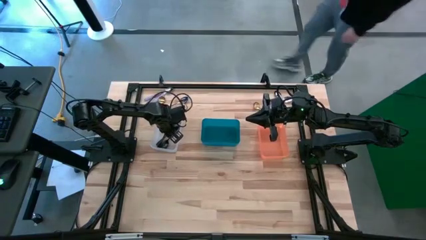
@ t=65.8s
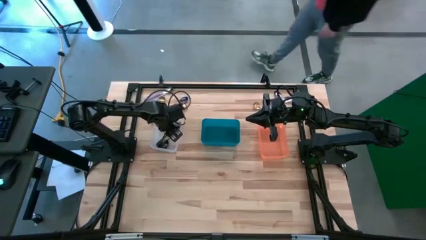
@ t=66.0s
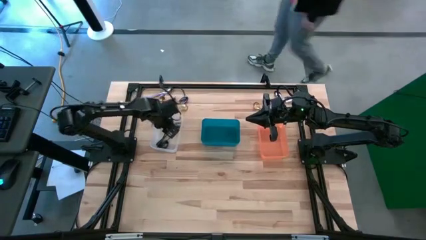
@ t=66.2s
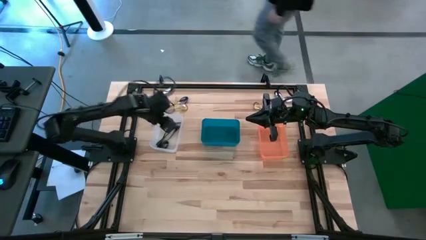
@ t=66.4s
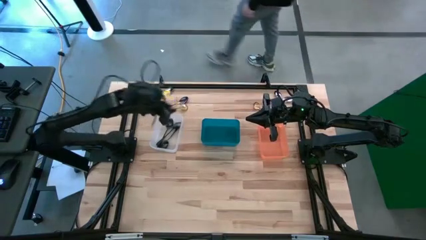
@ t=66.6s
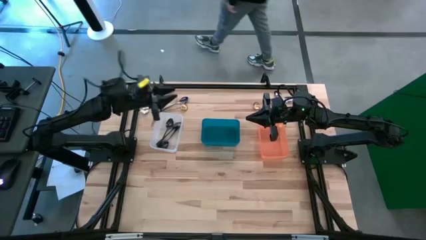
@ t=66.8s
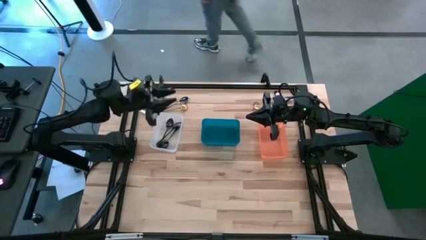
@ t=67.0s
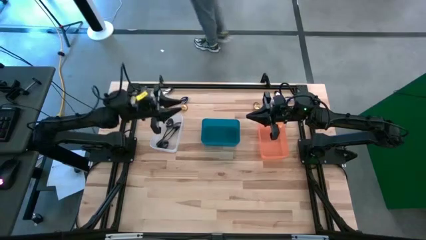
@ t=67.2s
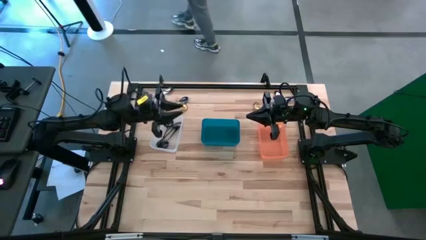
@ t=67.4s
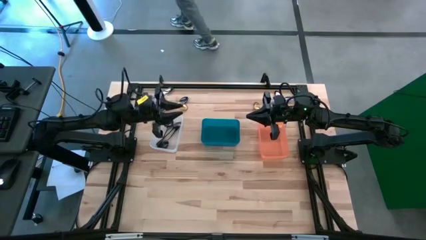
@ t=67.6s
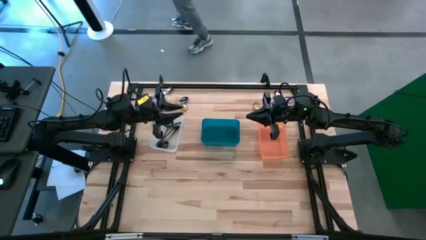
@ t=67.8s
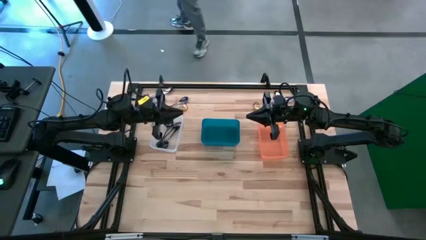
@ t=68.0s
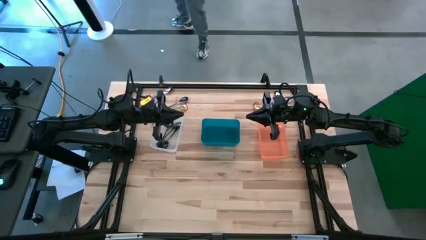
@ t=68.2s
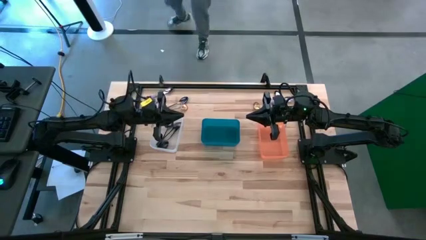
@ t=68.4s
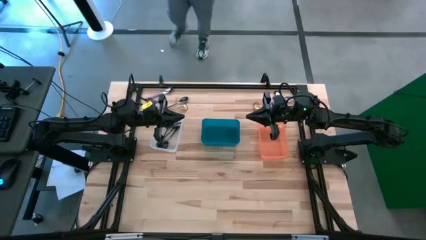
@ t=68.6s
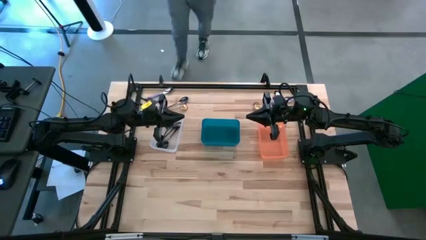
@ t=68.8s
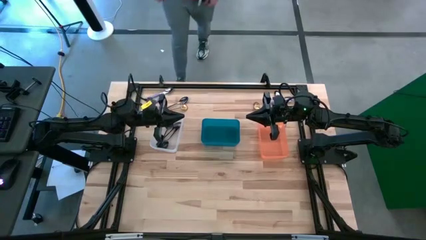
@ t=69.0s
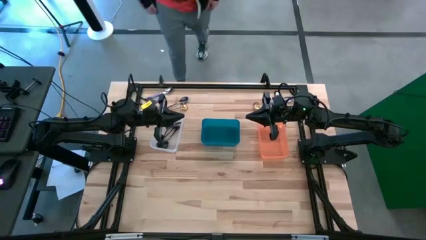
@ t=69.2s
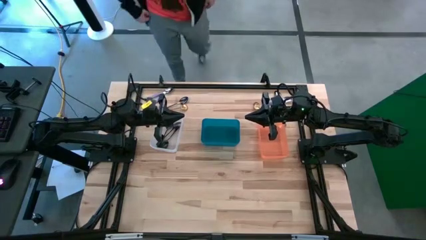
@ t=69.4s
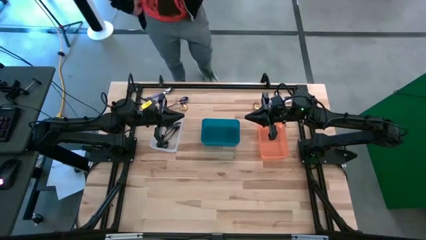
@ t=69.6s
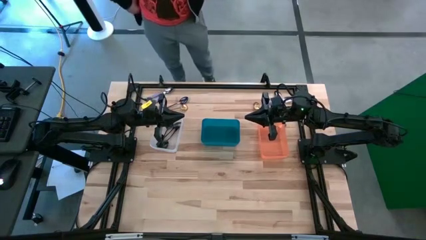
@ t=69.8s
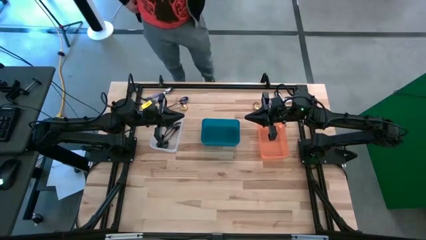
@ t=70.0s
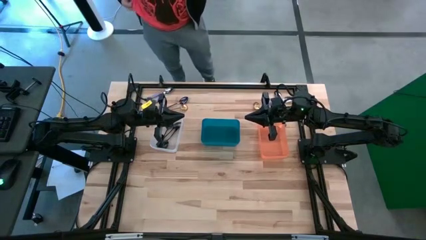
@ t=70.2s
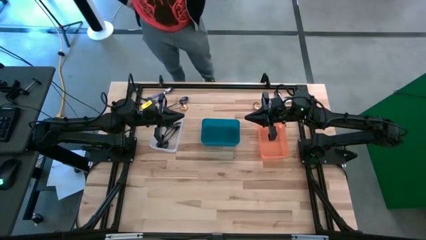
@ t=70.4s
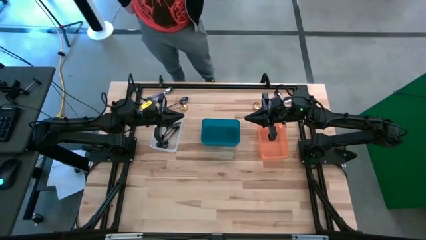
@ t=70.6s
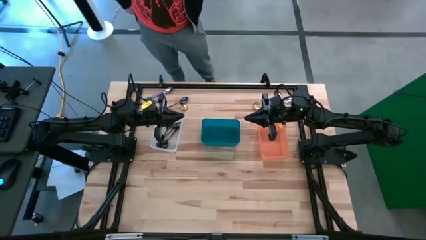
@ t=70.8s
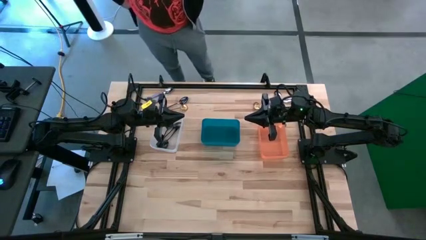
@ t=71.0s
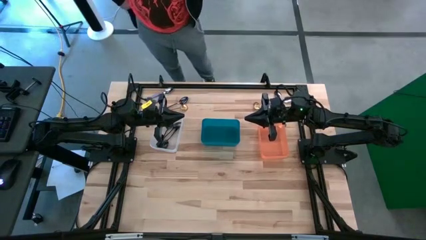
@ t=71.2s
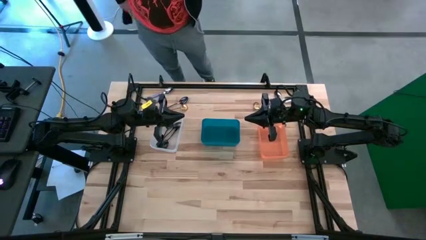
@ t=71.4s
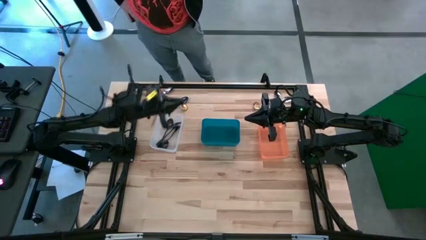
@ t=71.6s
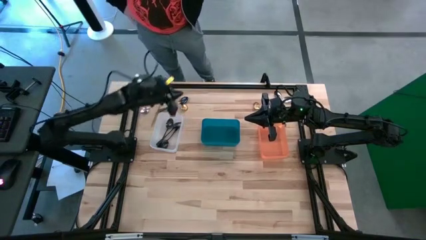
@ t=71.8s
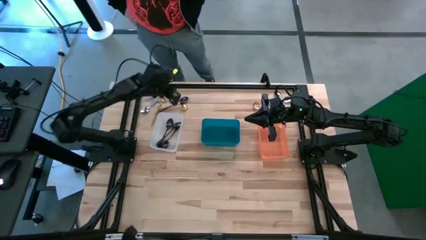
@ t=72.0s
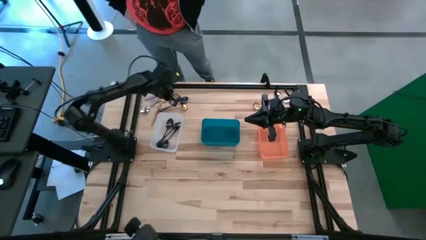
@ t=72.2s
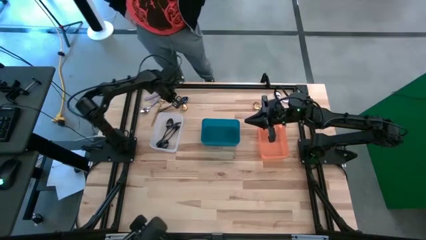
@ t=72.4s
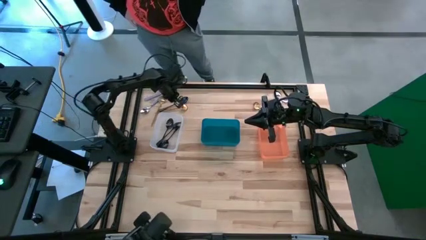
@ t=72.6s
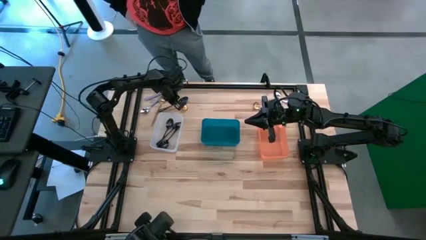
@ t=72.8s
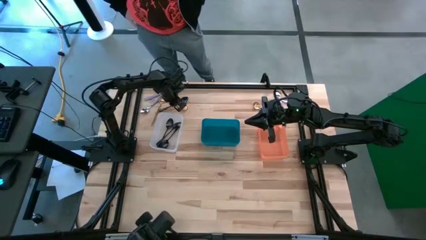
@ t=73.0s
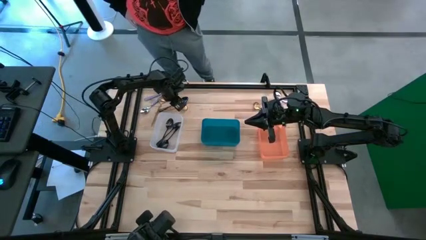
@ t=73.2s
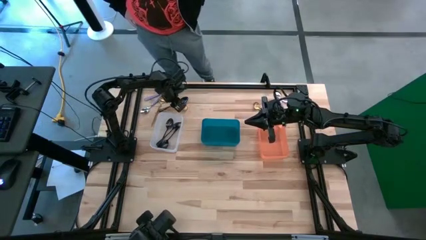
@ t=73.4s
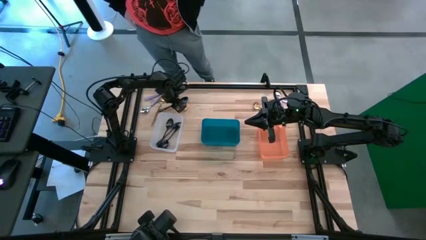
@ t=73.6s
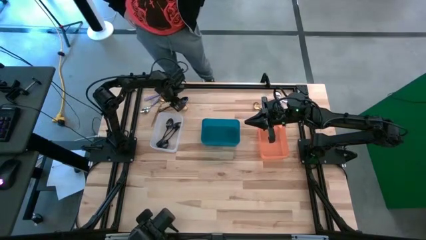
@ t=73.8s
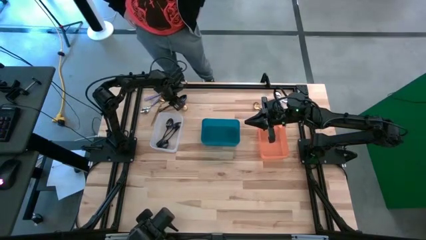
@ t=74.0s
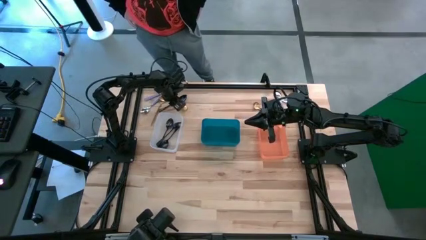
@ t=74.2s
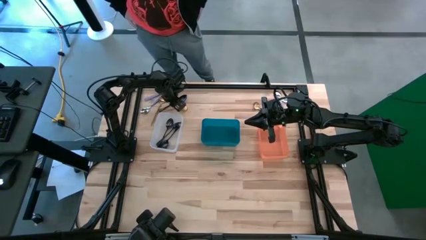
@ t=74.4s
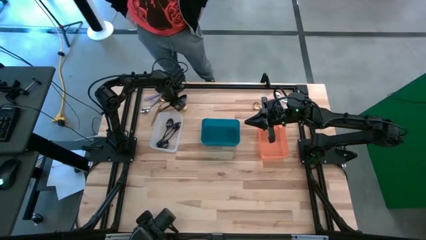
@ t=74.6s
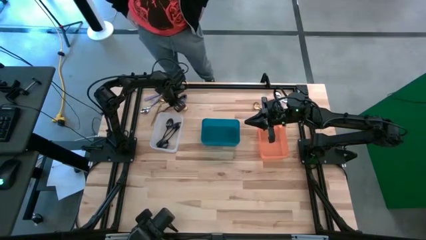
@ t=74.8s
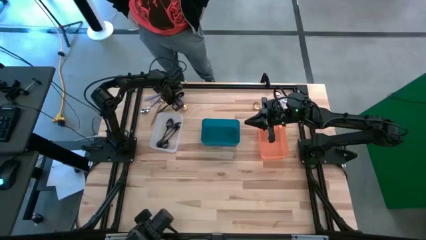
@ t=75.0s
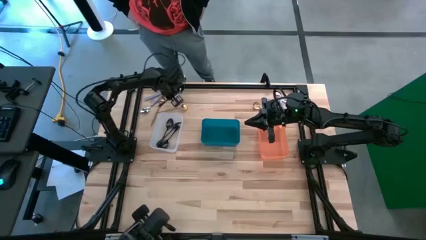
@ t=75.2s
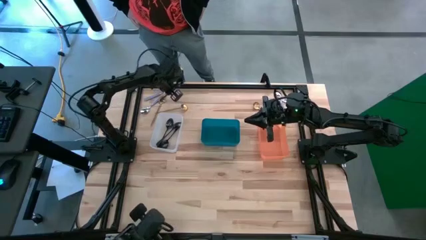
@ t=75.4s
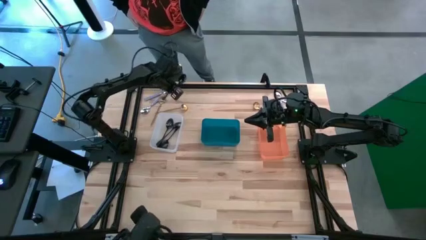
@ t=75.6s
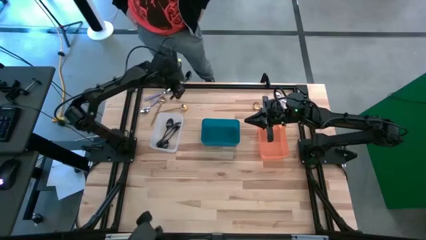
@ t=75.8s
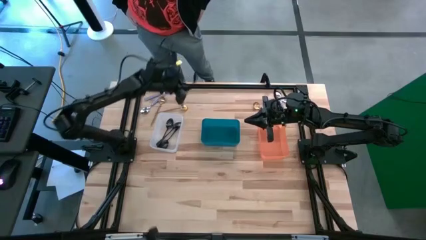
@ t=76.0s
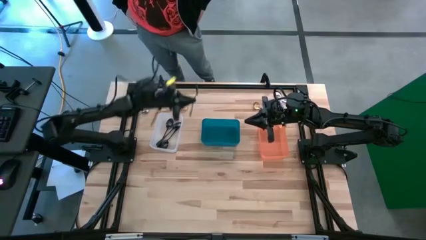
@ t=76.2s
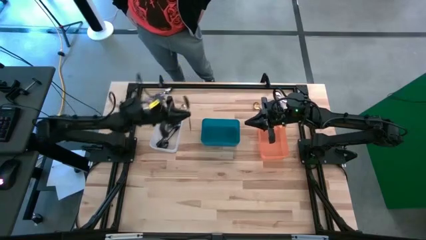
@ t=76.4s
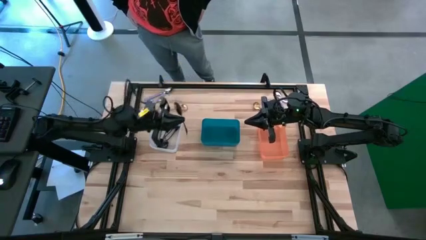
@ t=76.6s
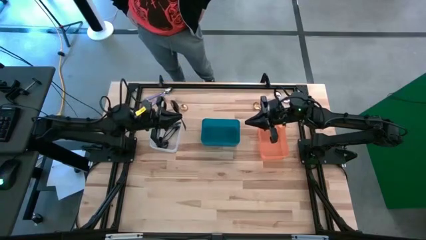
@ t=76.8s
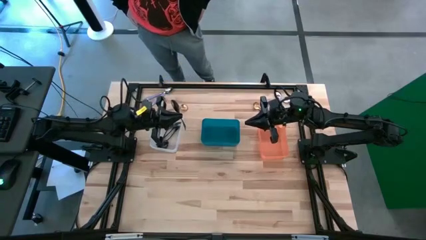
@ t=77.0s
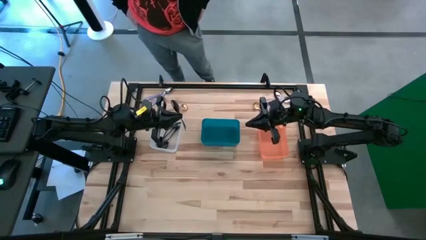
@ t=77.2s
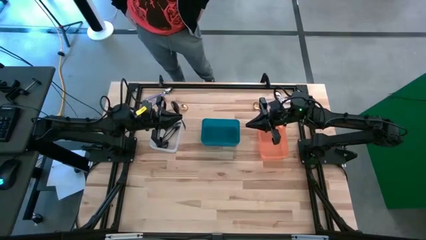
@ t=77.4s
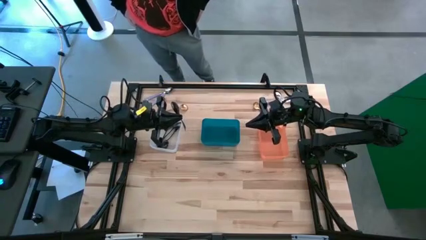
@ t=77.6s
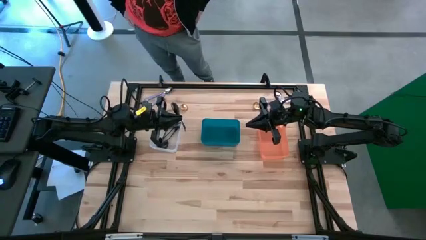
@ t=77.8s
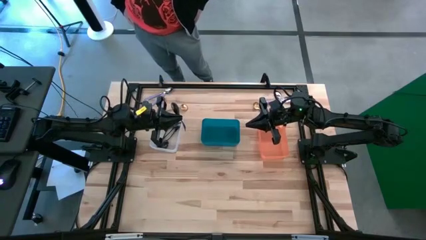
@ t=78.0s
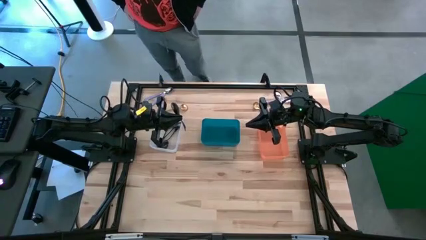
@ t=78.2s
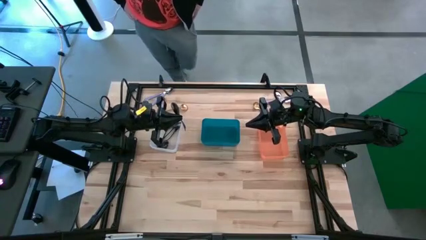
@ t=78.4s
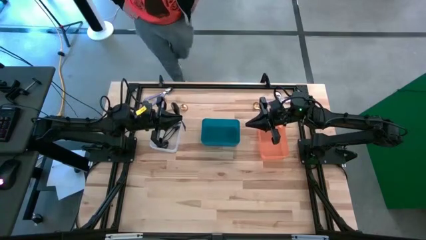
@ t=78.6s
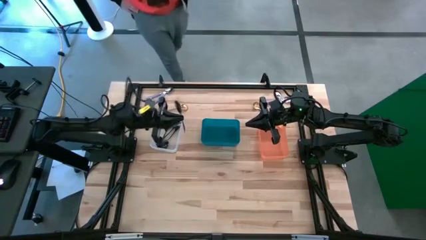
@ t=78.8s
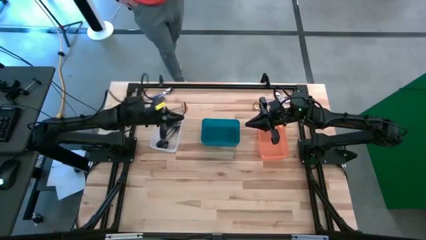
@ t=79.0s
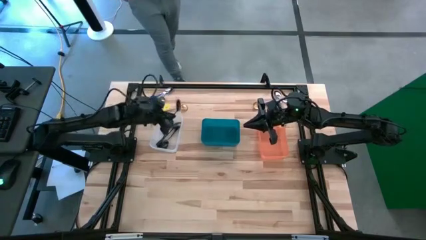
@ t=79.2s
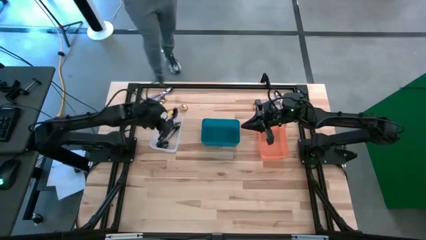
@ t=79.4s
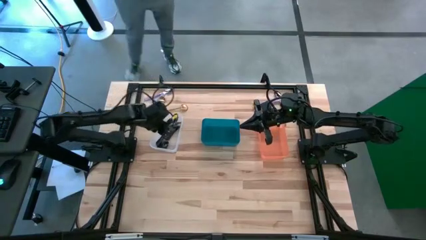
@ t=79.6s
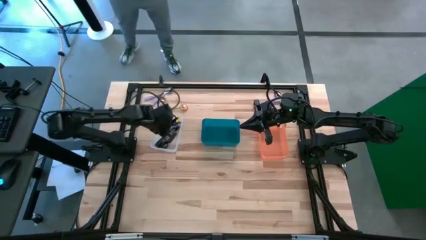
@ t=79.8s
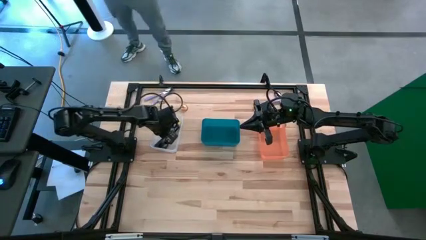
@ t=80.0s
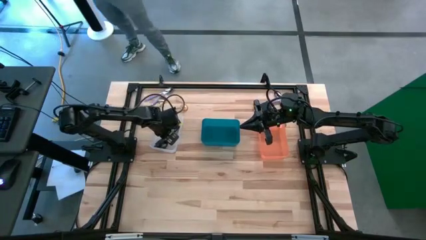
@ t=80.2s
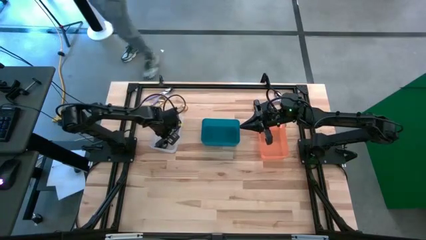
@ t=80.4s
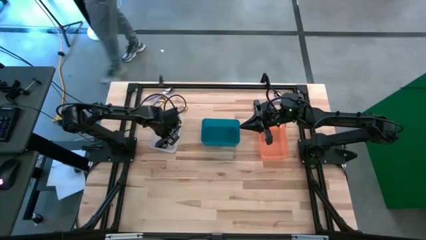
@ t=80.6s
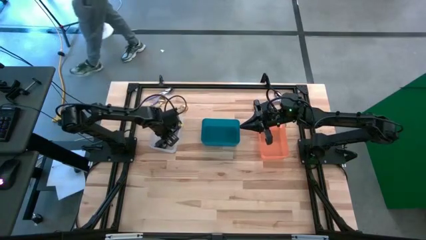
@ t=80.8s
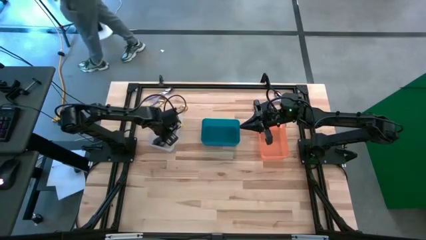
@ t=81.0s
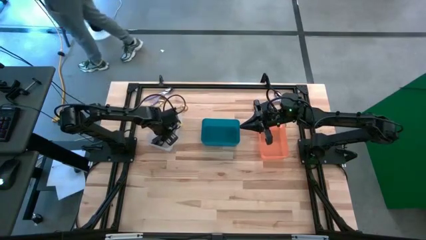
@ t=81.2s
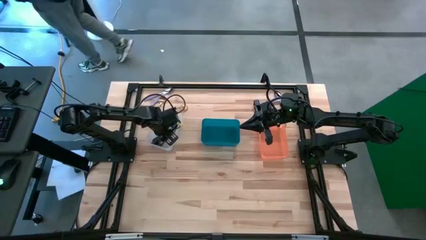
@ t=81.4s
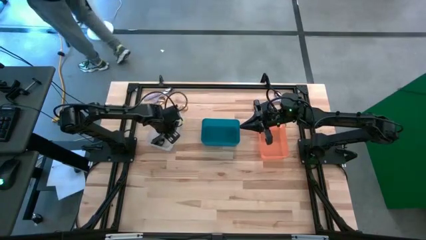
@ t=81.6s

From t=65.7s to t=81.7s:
Task: Sort silverware by color (type)
Put the black spoon into the transparent bin
